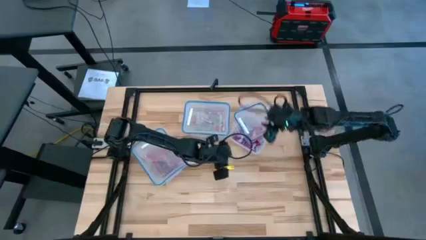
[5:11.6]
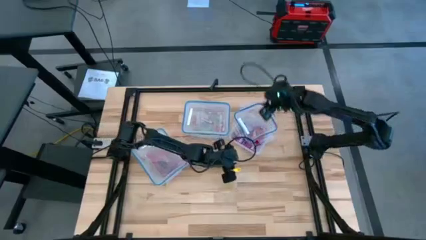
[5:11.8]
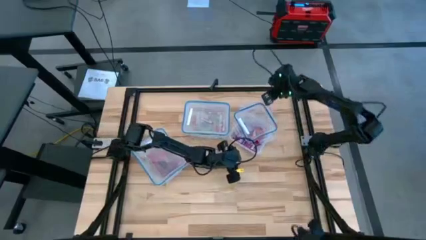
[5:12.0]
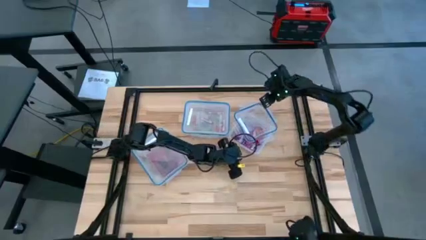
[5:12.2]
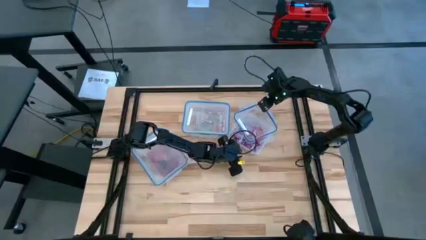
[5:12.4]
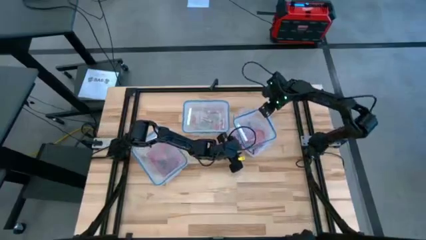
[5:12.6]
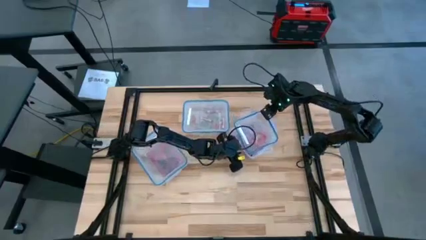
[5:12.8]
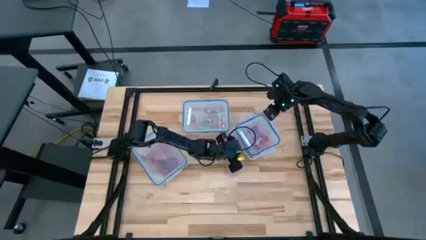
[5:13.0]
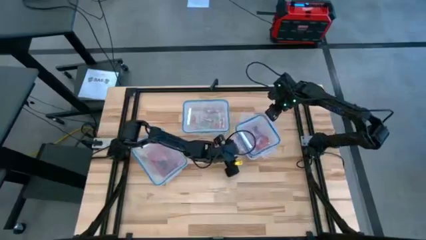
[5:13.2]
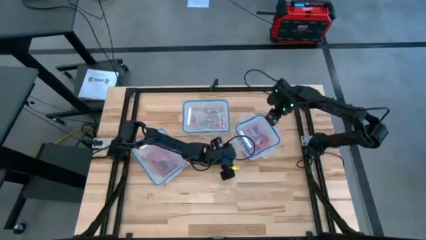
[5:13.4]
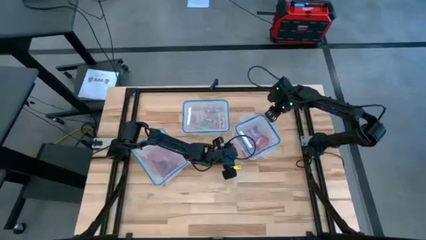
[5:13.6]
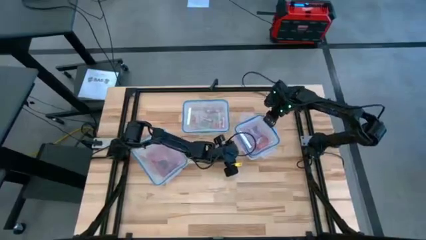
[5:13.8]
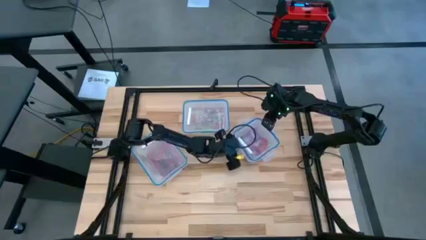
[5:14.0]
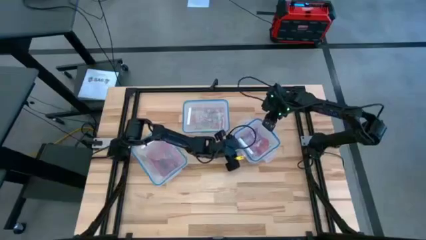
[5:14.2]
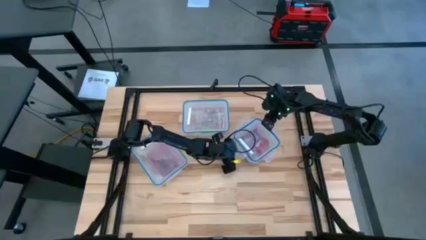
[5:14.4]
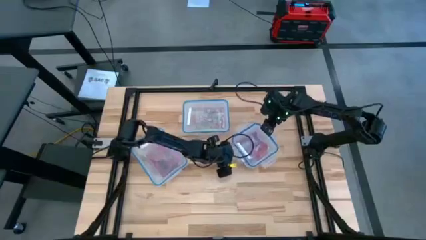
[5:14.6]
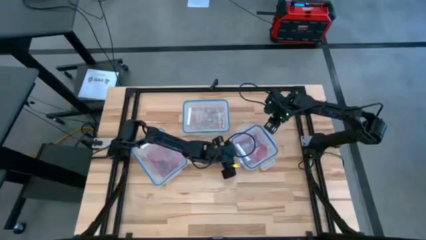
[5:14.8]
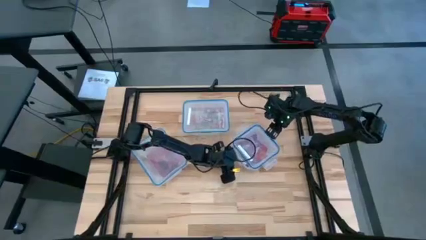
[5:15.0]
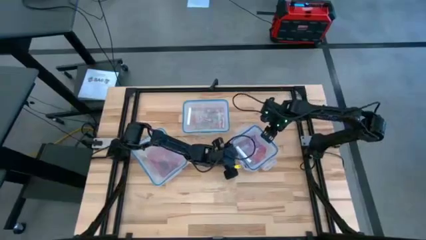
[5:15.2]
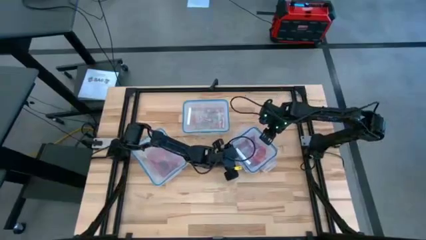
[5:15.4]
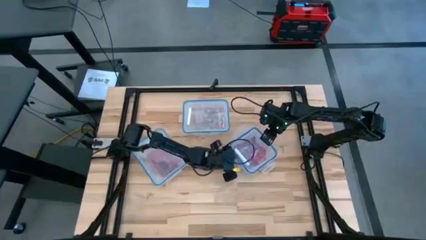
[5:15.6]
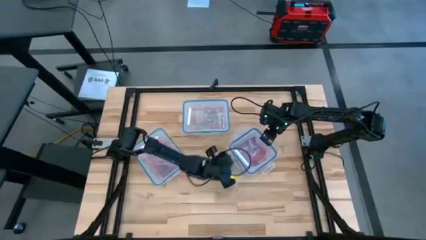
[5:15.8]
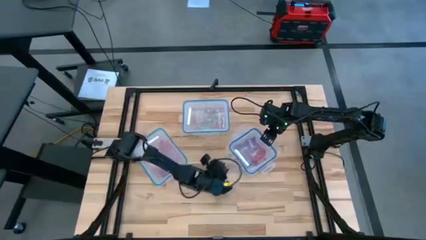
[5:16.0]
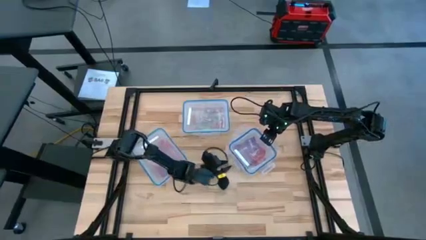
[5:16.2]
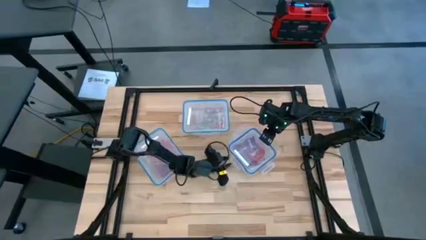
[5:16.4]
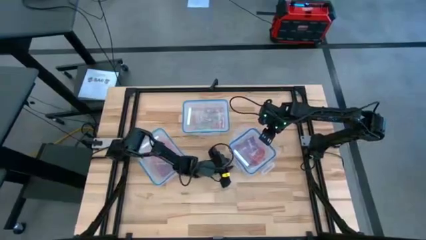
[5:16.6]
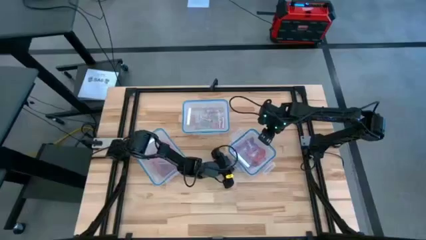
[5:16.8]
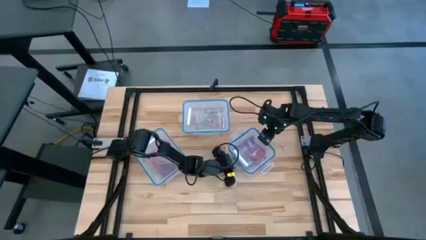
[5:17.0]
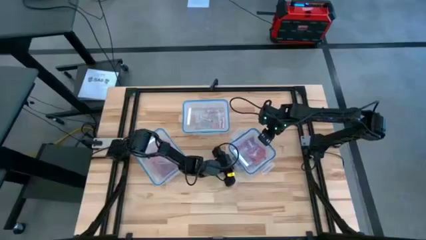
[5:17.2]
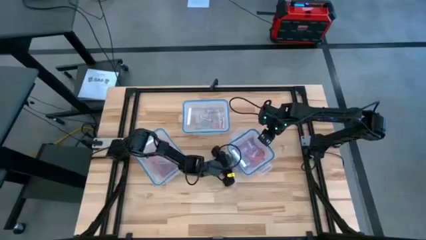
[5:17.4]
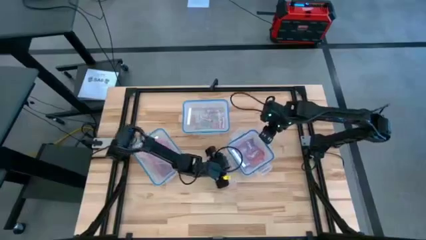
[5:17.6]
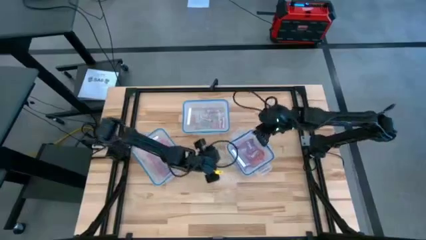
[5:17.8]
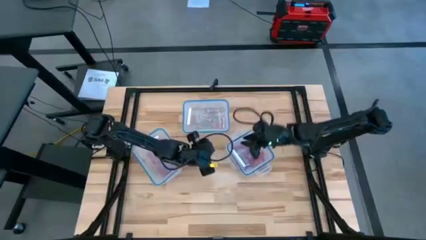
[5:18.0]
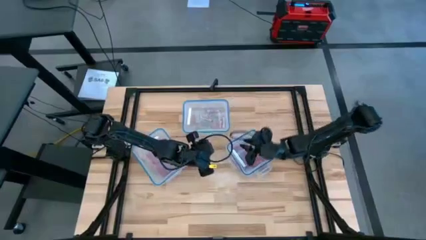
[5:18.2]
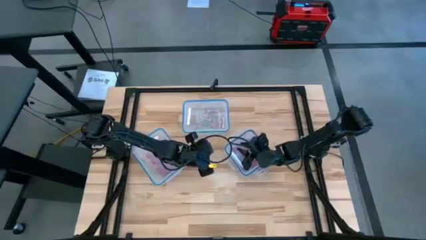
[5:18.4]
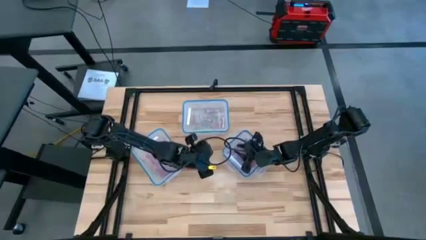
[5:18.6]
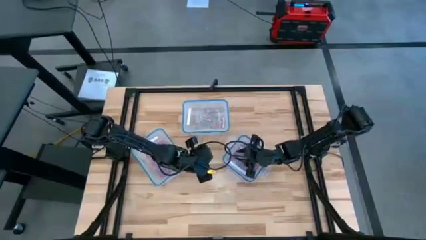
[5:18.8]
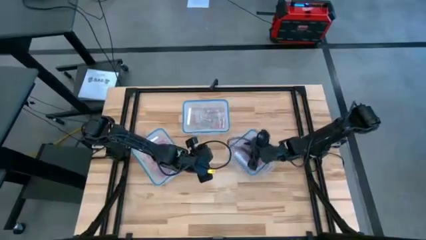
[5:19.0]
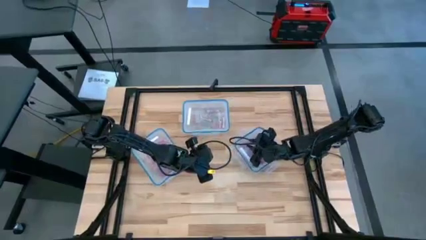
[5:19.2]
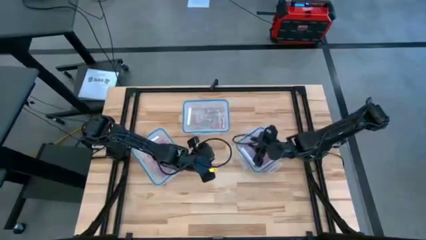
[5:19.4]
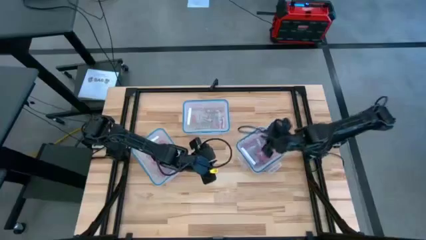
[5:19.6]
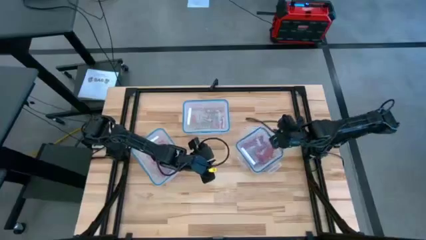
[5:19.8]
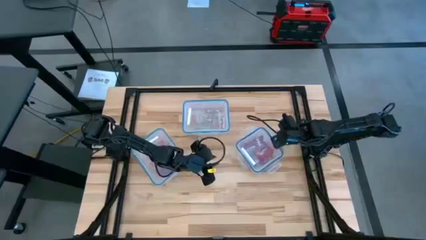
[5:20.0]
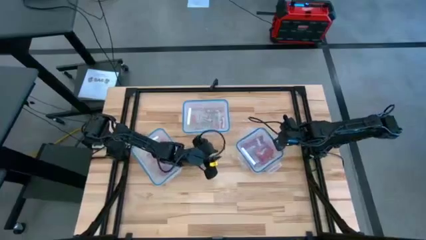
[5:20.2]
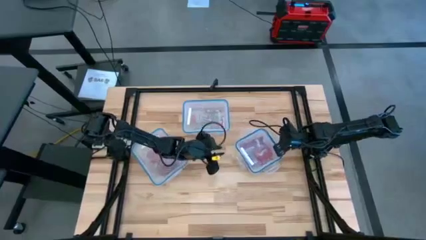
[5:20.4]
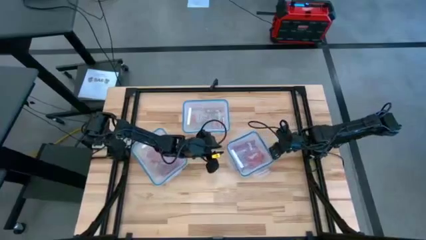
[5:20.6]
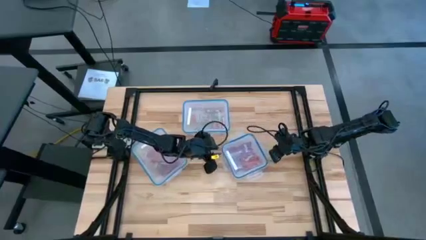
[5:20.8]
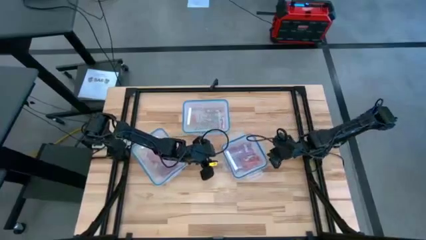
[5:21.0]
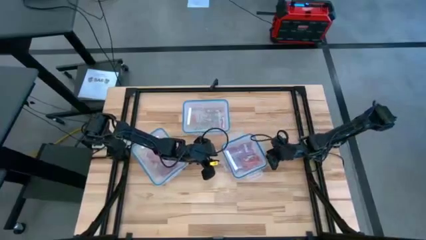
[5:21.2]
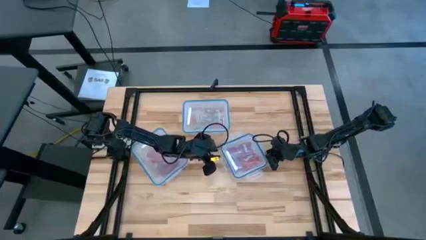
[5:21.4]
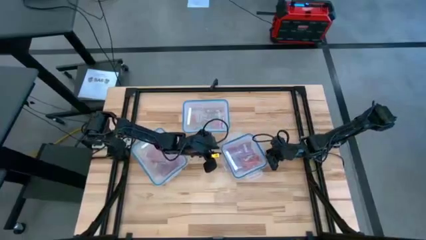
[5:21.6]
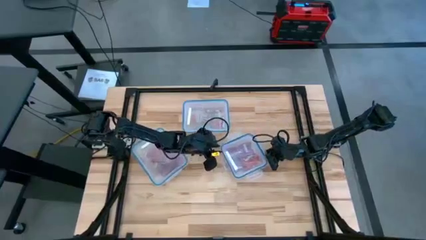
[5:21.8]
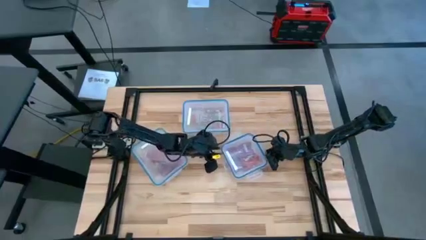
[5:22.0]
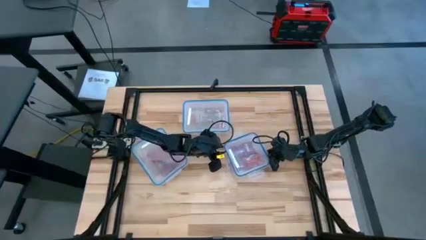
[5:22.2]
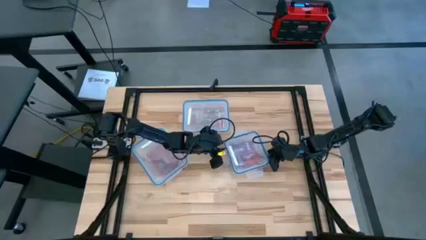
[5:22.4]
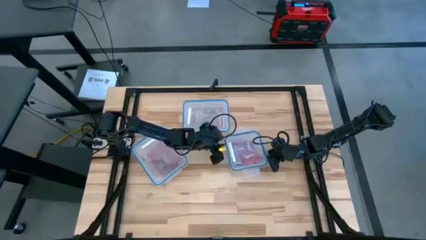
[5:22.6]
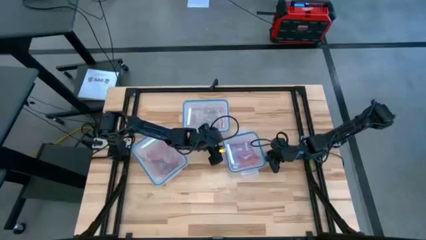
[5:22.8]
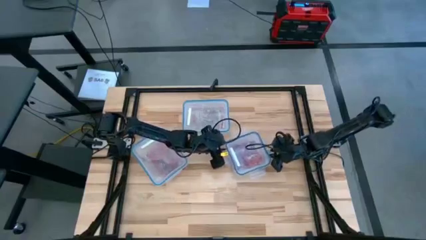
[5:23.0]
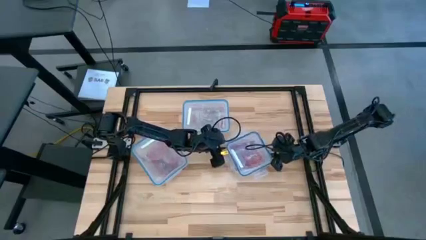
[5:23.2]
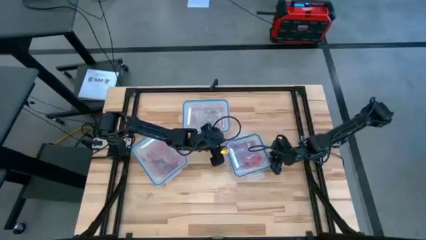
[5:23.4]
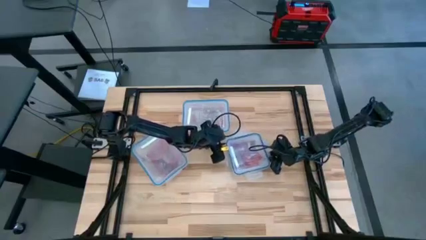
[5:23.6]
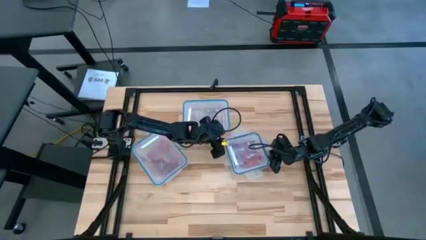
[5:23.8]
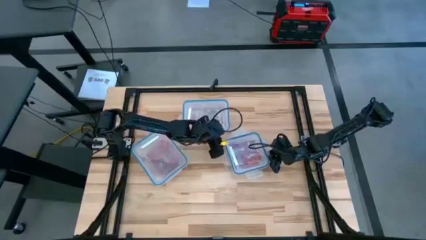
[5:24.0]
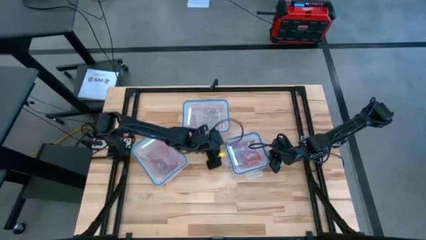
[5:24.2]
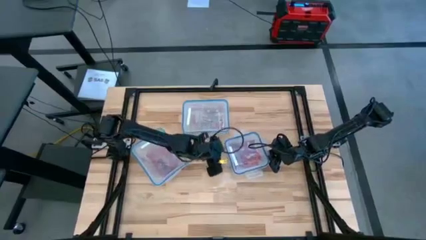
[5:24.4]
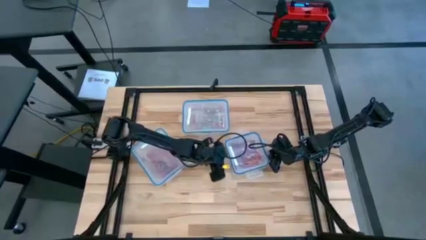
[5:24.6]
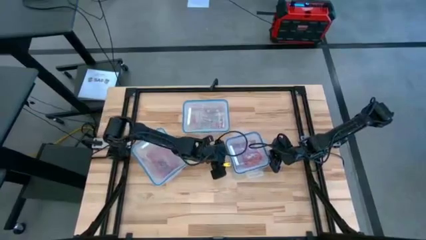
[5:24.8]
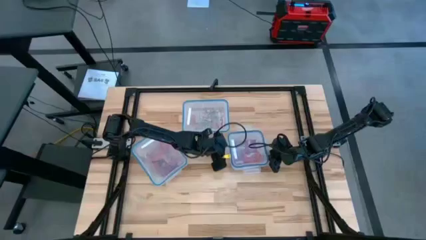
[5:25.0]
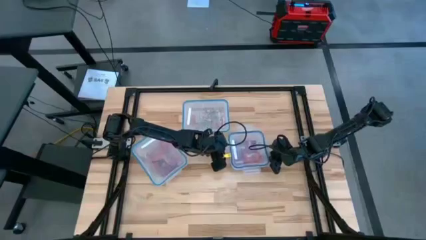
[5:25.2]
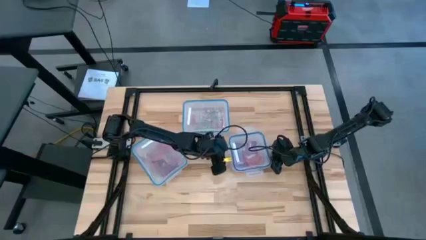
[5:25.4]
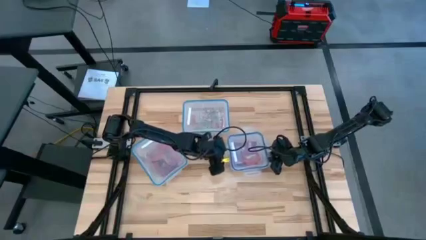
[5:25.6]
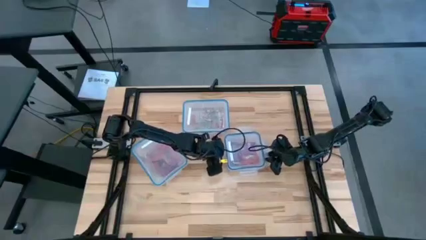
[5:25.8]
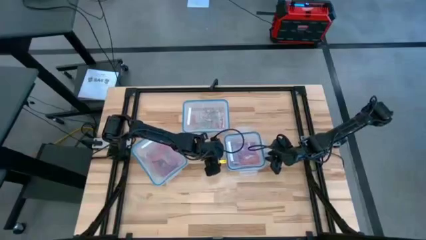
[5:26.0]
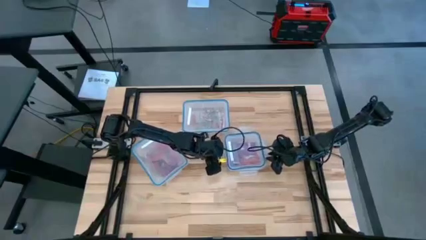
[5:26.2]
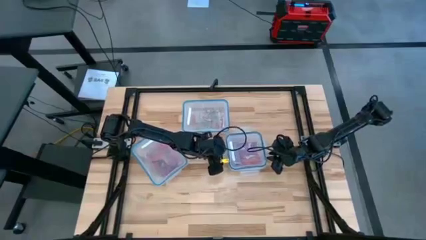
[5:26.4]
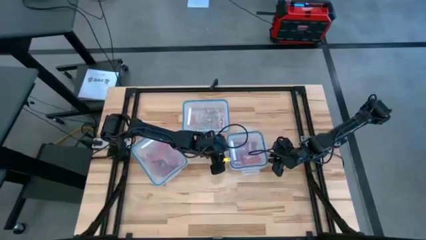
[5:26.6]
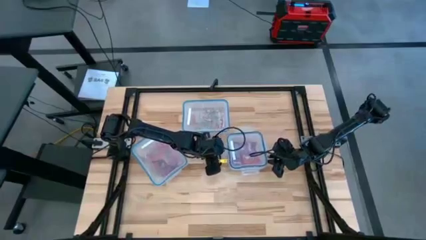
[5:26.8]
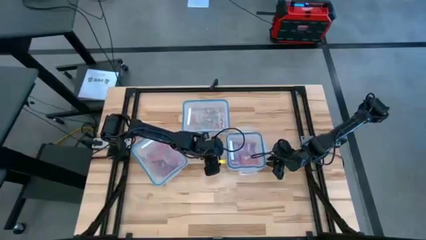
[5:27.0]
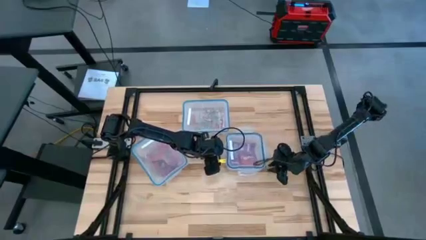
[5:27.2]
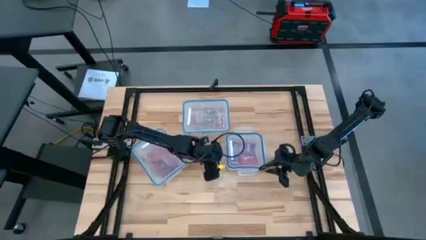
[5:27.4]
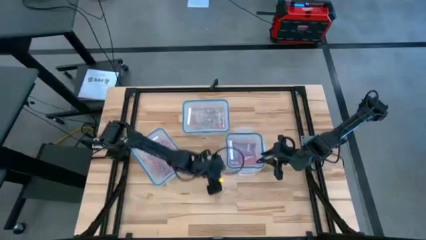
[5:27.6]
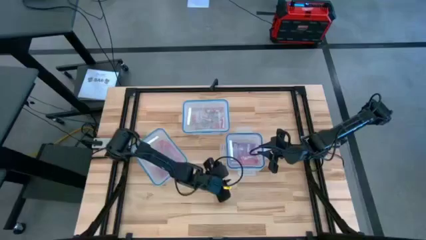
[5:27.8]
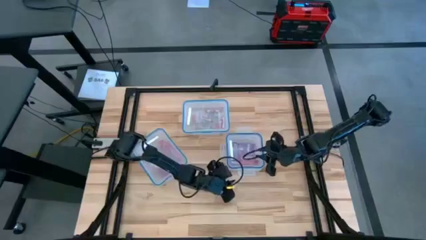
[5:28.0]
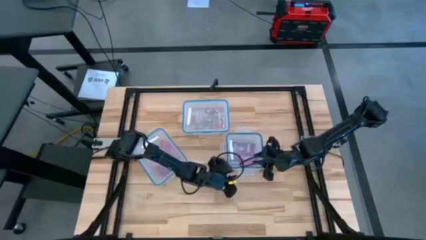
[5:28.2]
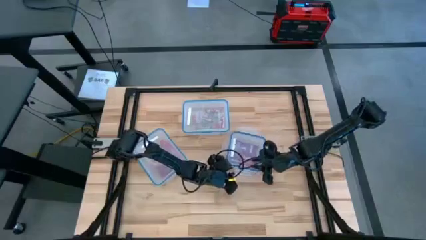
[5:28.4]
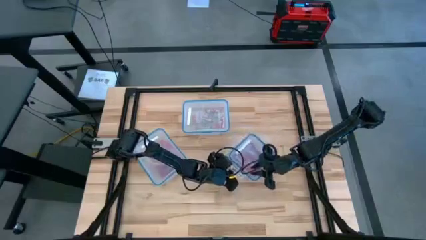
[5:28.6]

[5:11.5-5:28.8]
Task: Sort candy
Close the middle right transparent bin
